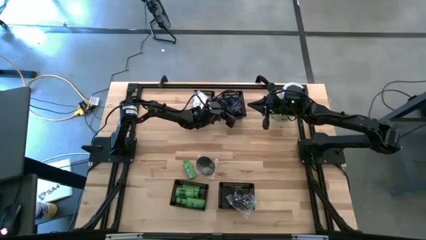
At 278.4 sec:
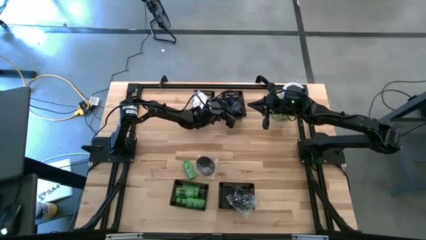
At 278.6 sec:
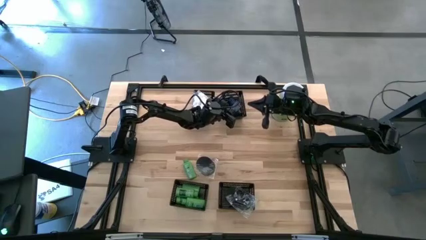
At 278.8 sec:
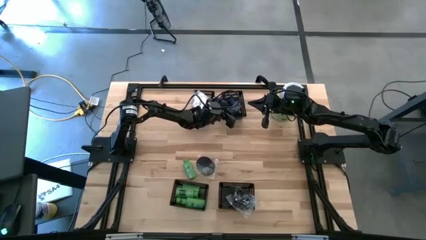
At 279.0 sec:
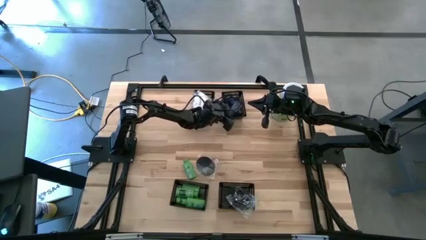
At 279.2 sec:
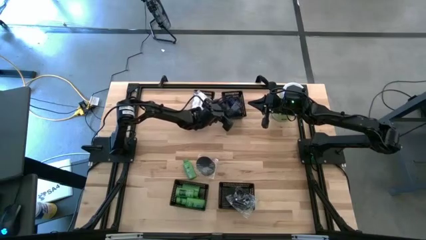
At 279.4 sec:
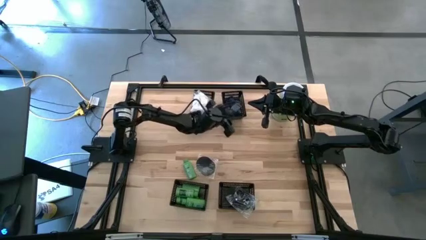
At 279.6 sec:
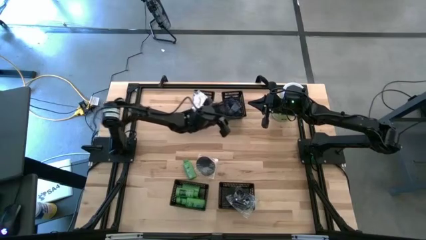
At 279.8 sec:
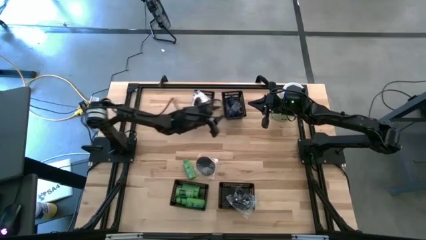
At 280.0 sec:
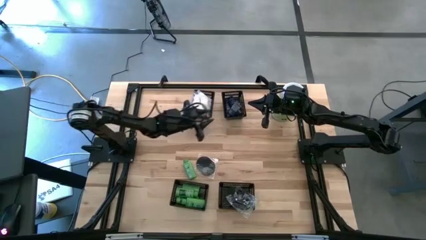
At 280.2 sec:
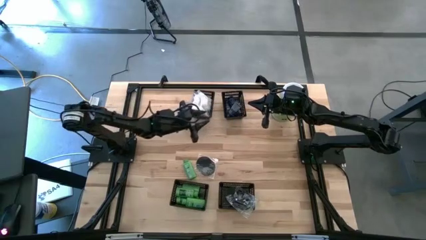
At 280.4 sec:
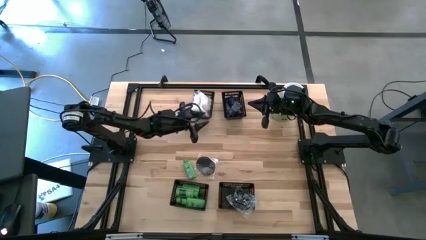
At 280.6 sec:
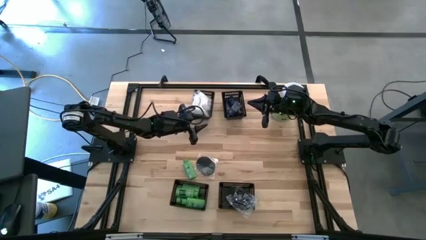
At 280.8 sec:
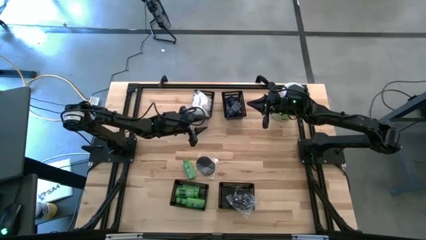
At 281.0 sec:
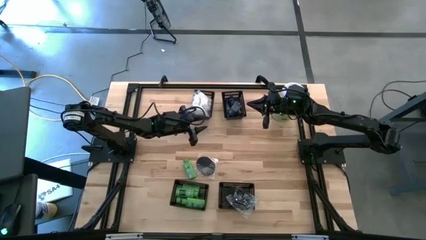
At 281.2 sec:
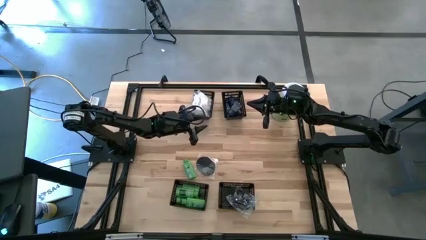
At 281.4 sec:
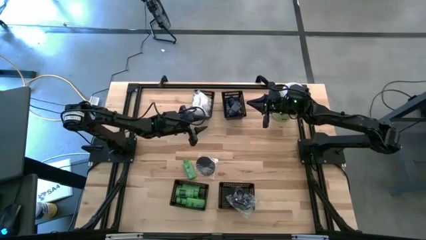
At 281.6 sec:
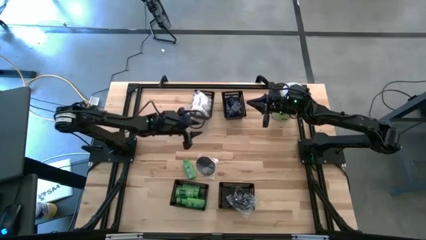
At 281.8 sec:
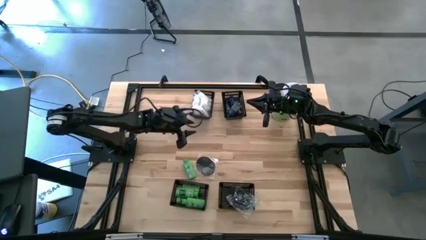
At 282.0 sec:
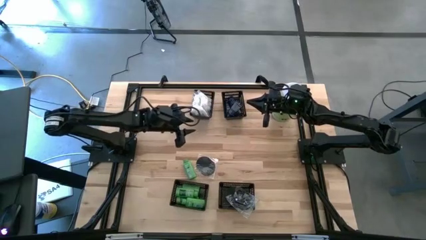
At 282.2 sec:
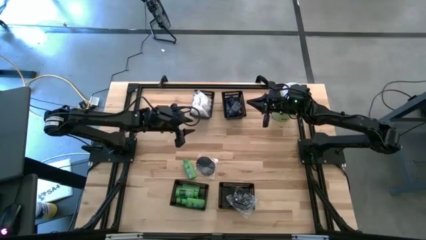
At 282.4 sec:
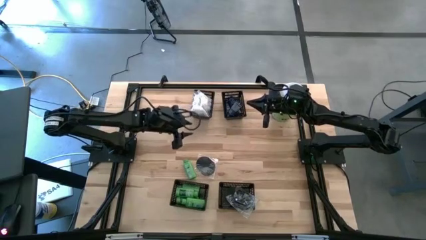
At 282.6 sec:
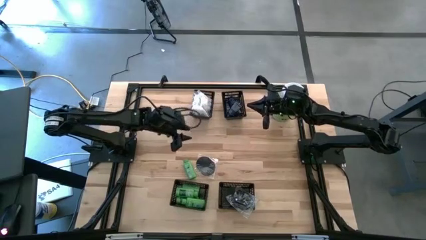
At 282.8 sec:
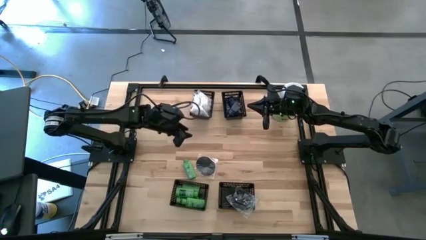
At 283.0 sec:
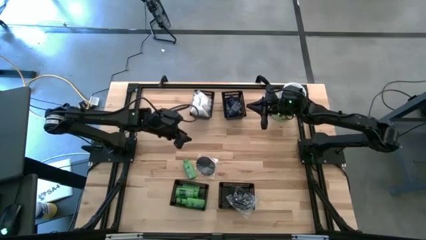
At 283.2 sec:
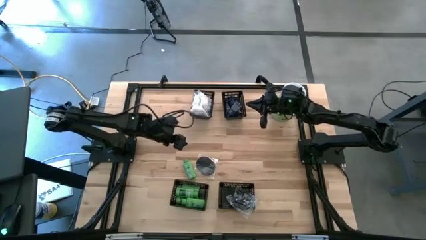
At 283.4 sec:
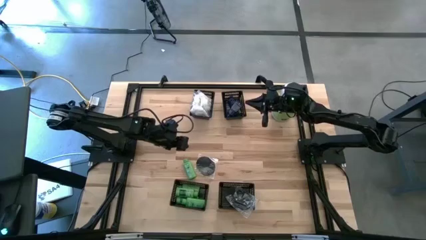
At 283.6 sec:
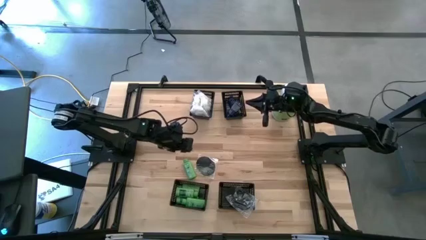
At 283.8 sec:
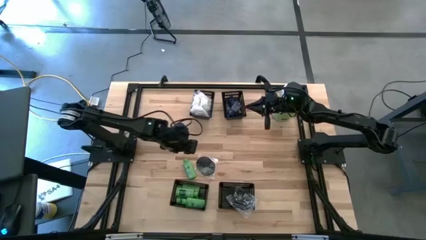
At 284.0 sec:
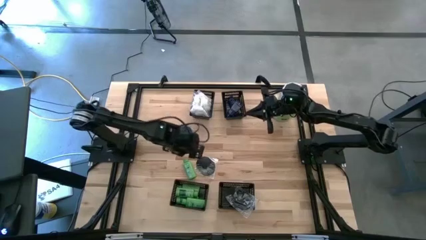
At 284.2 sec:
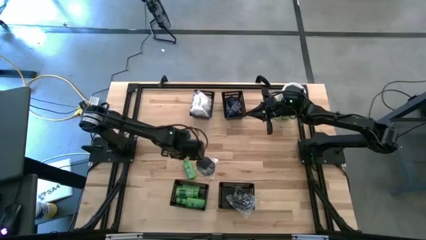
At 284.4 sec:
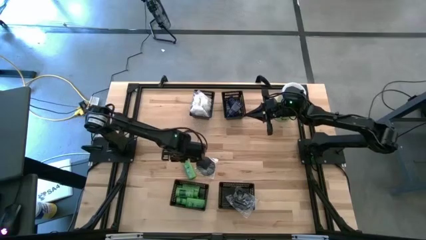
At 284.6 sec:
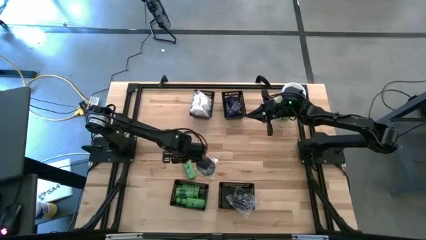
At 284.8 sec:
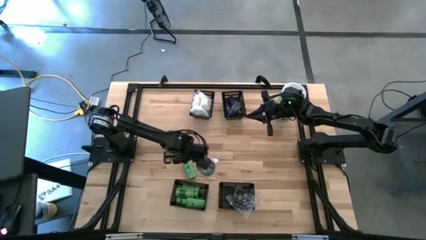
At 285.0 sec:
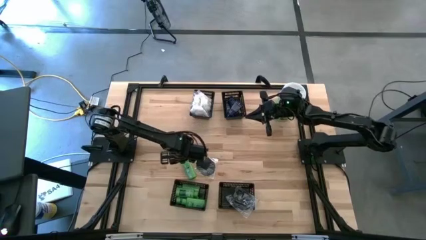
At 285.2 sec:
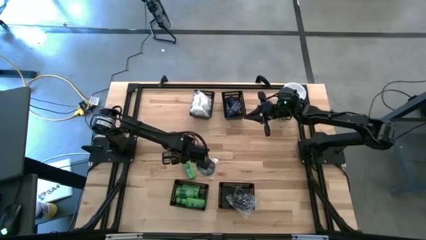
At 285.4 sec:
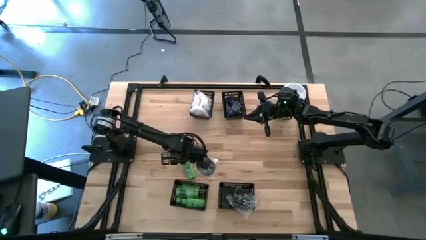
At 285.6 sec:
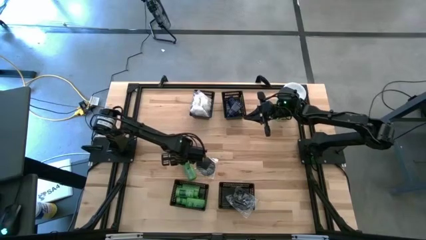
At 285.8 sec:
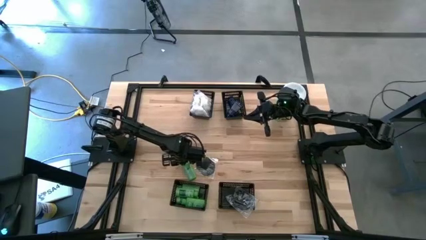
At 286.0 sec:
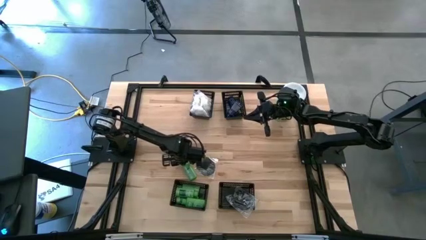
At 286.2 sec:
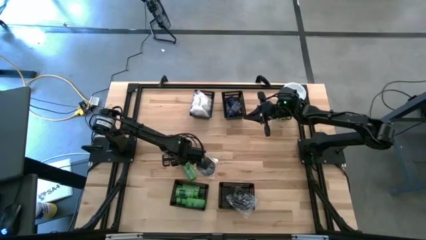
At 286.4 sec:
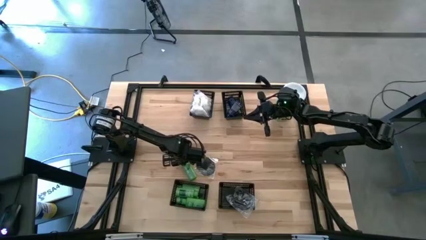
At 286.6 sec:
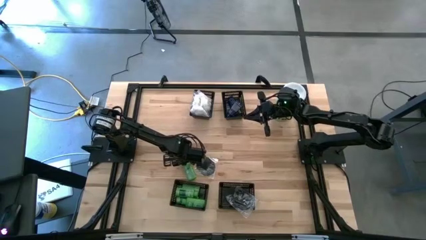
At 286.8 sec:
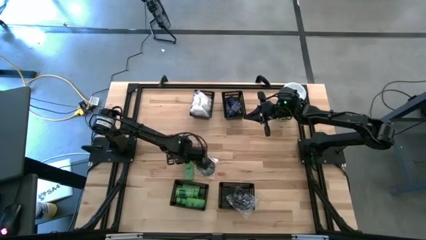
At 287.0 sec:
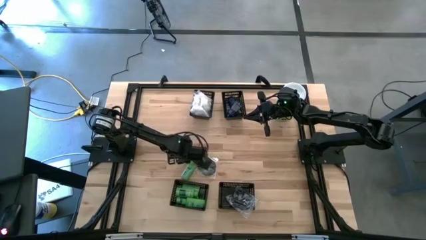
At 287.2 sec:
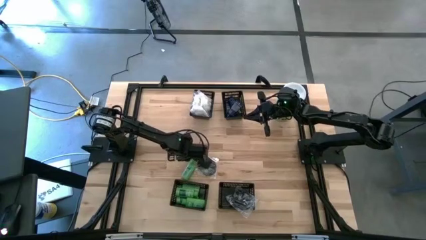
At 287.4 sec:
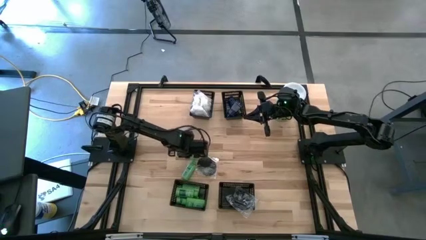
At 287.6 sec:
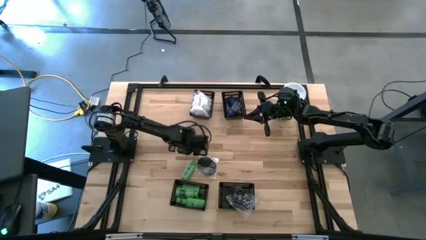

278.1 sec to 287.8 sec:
Task: Pick & Place Travel size toiletries
Put the green shampoo into the bottom left black bin

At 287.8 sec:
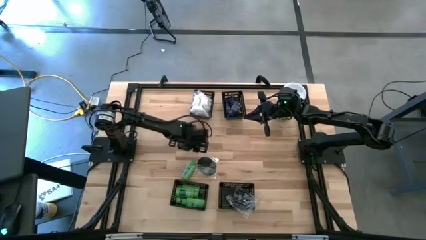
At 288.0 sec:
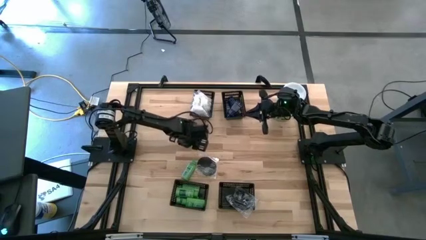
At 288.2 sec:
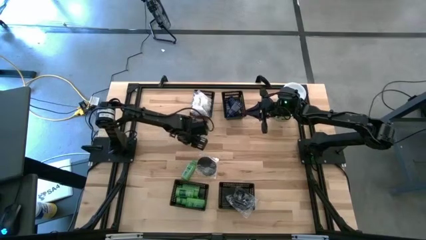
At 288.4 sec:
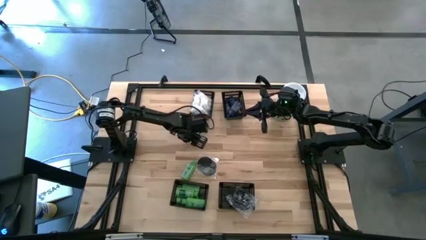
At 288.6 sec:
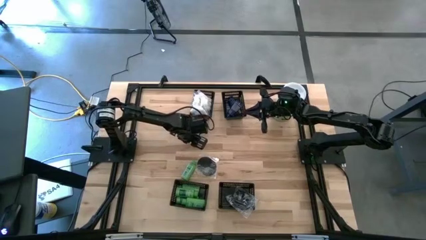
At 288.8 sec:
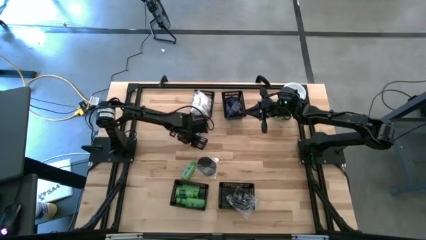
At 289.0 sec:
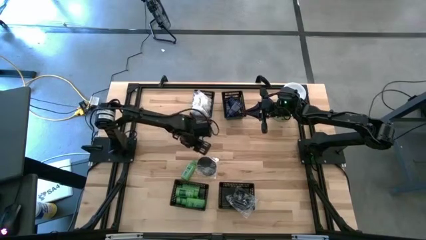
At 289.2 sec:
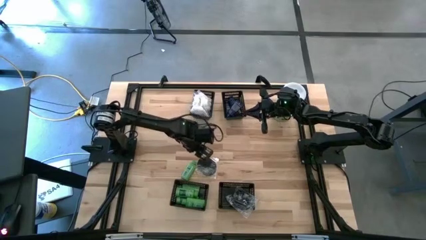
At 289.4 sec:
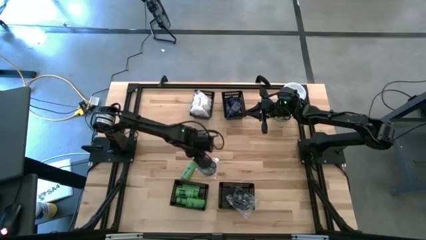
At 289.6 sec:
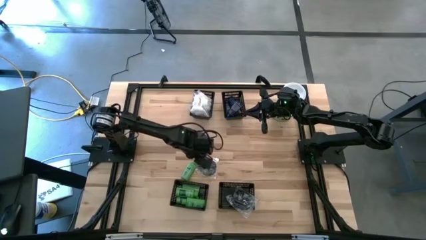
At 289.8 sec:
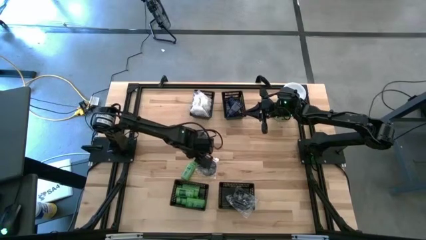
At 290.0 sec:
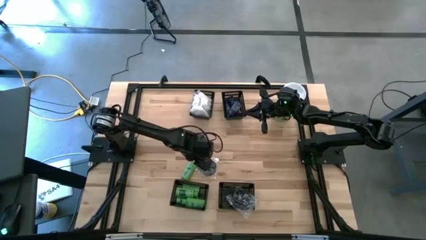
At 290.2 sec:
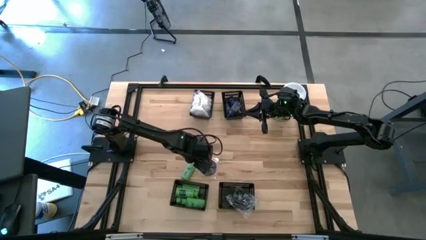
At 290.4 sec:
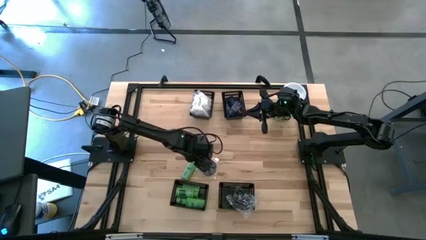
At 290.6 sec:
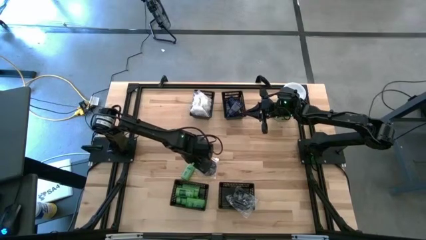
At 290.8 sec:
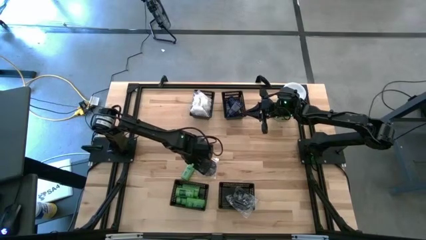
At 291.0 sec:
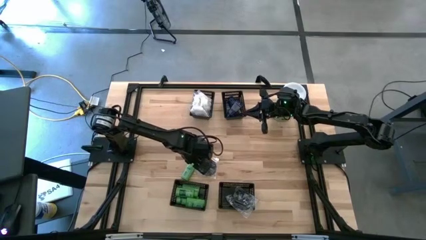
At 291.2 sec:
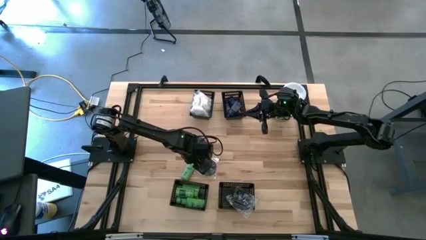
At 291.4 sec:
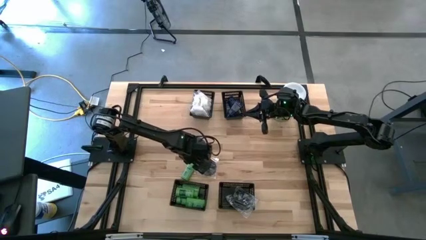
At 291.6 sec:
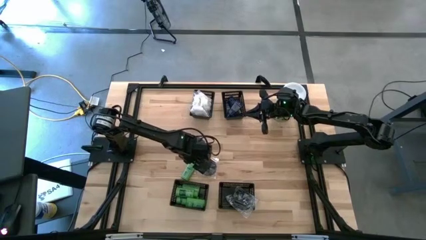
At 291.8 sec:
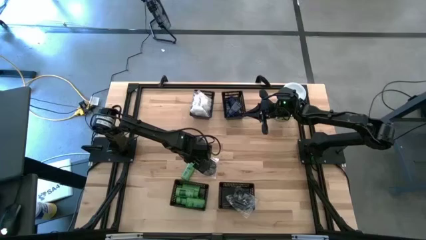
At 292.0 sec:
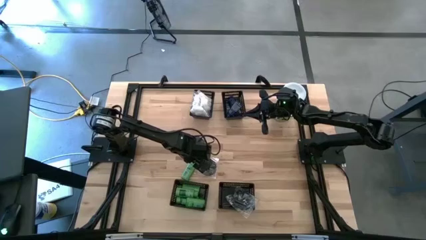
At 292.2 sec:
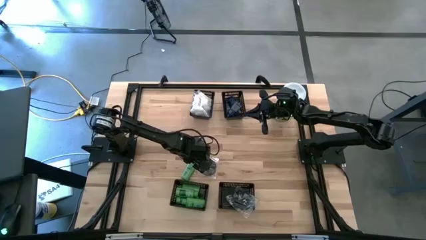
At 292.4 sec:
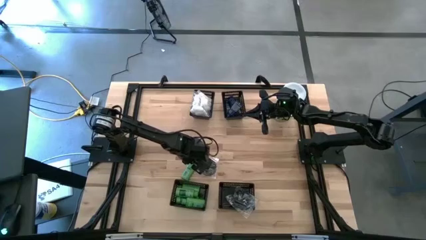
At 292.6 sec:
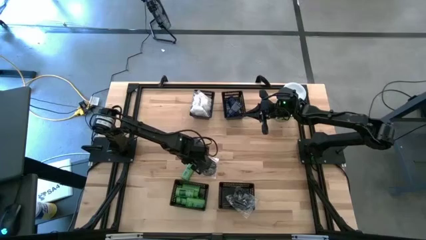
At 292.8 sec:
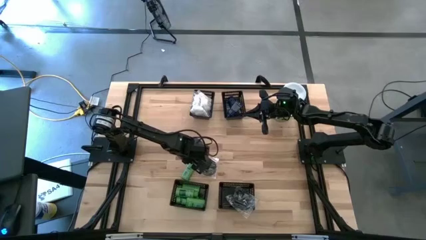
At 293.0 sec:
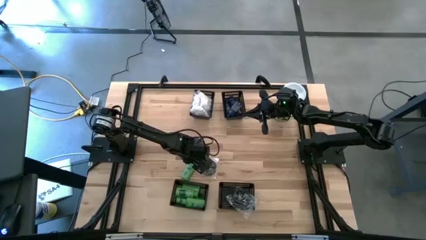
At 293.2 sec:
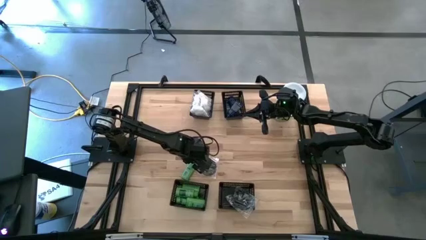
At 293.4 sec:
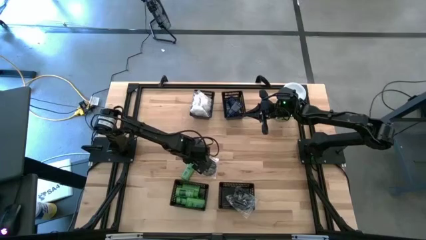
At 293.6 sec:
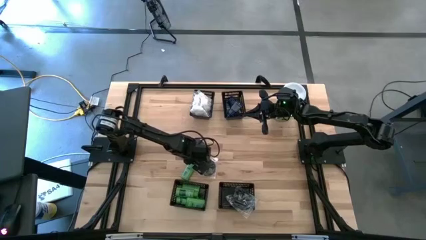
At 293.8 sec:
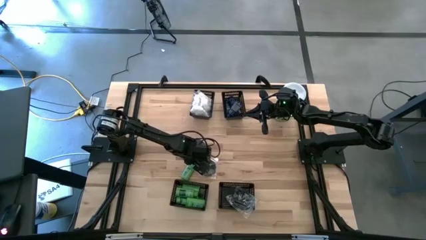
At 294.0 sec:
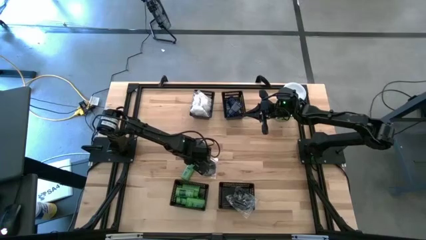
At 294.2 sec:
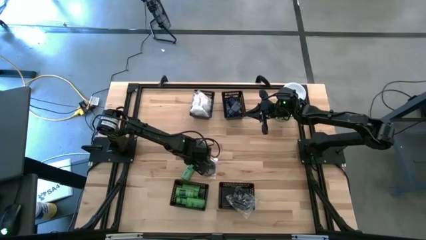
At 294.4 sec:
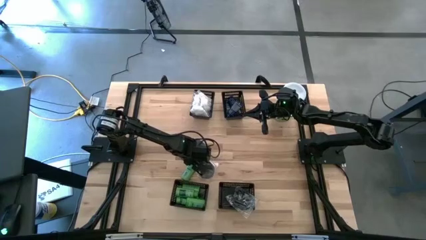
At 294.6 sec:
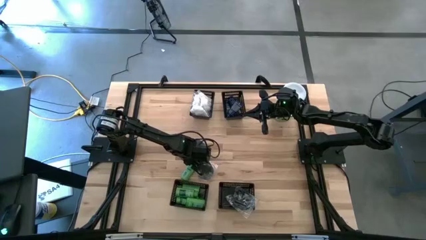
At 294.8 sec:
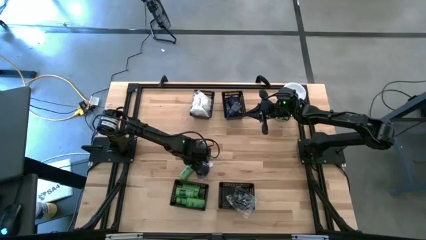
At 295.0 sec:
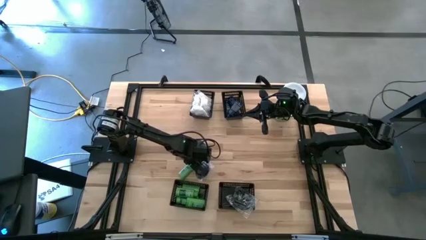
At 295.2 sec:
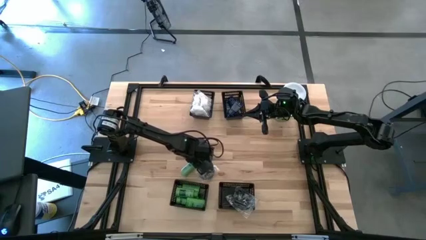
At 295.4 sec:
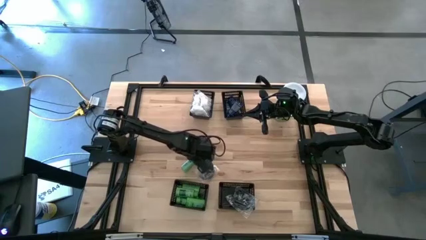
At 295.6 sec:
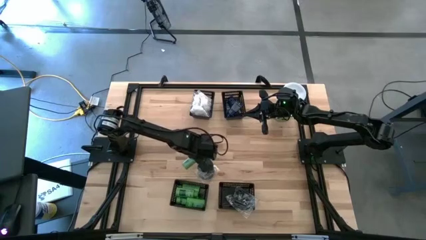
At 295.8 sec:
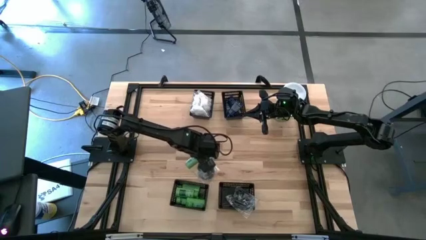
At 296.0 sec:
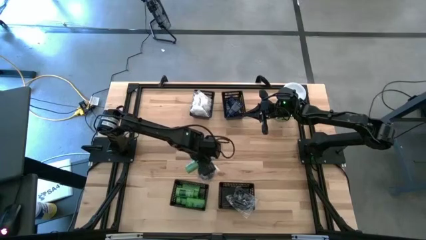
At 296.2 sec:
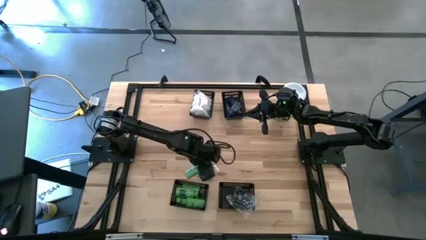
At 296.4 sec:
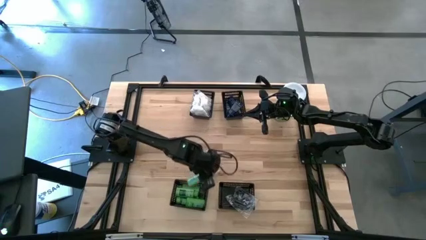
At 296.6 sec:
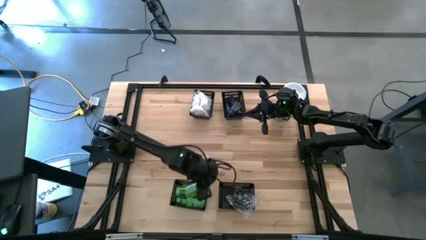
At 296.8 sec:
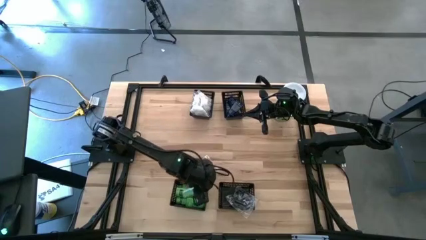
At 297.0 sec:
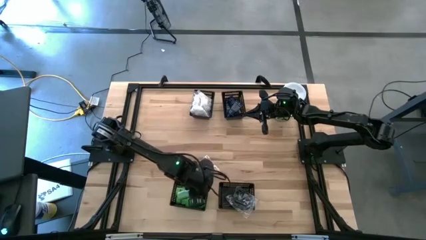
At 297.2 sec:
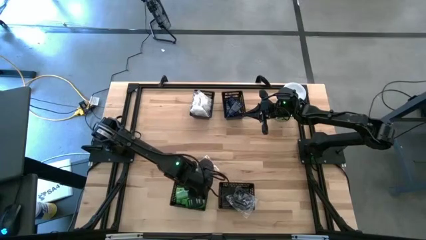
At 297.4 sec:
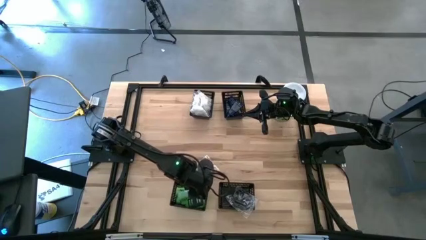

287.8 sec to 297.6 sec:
Put the green shampoo into the bottom left black bin
